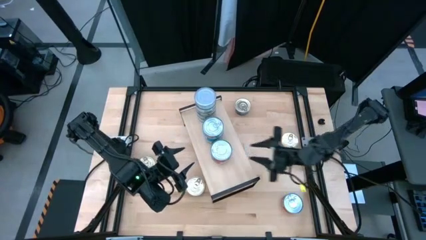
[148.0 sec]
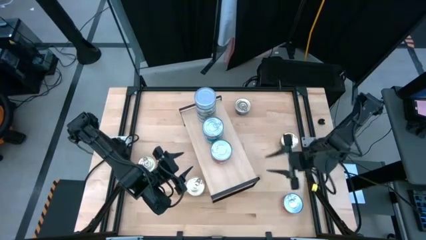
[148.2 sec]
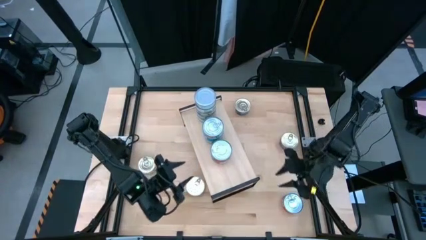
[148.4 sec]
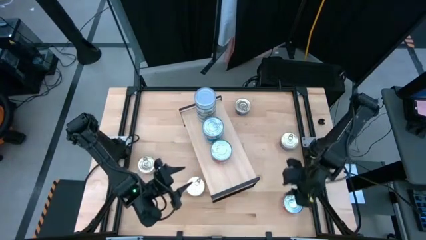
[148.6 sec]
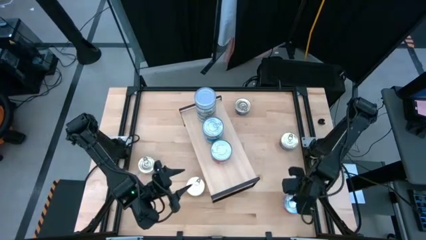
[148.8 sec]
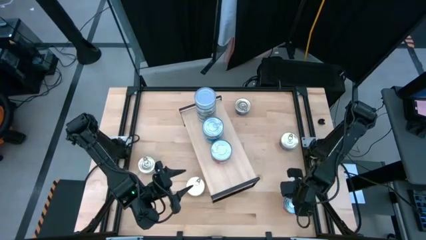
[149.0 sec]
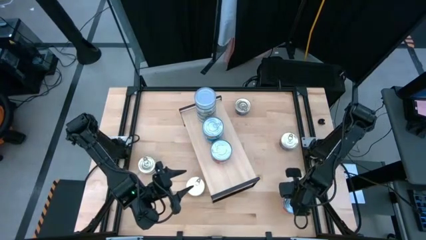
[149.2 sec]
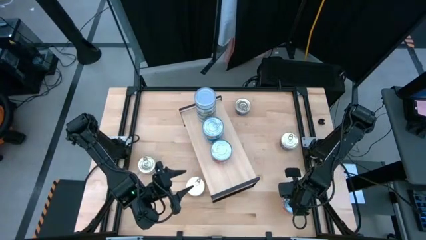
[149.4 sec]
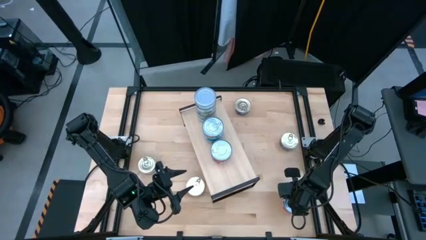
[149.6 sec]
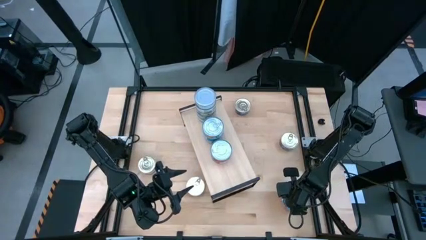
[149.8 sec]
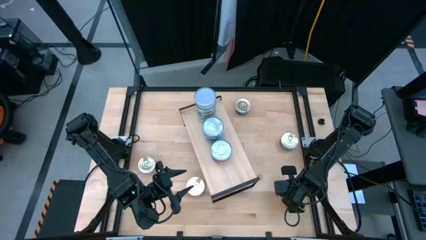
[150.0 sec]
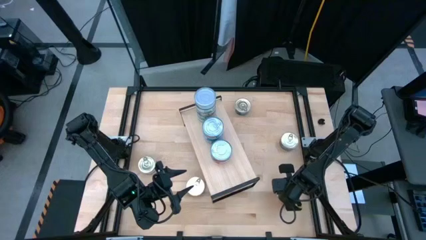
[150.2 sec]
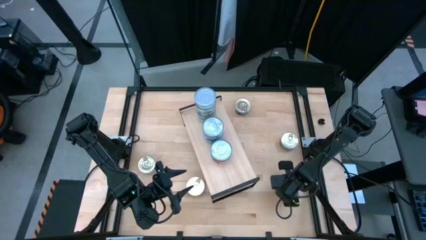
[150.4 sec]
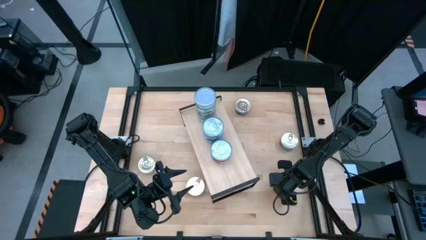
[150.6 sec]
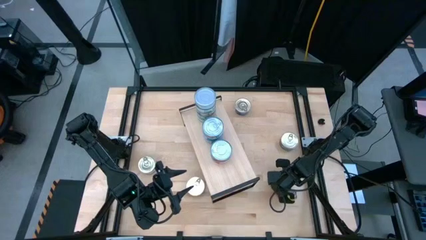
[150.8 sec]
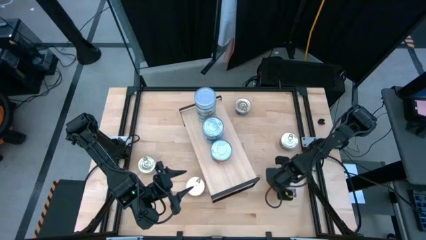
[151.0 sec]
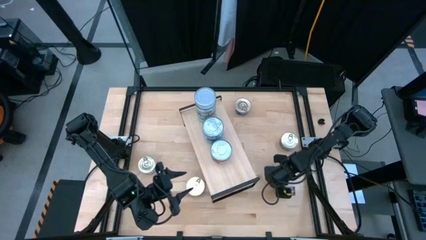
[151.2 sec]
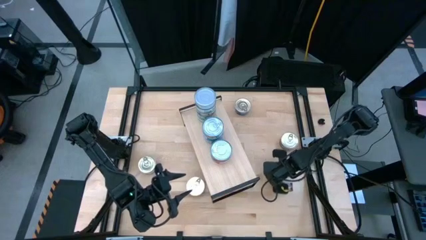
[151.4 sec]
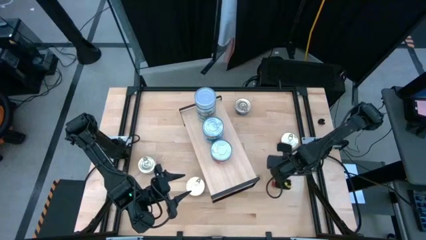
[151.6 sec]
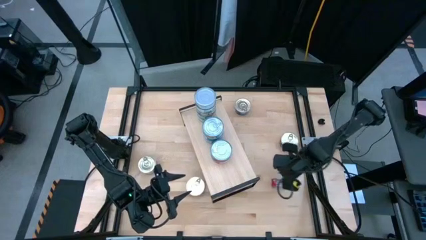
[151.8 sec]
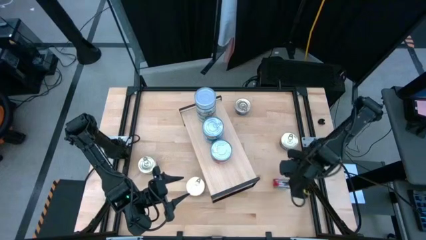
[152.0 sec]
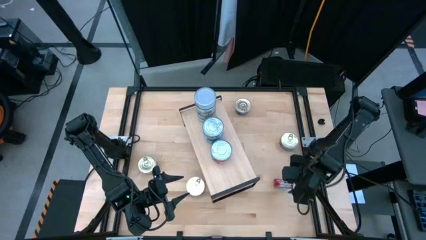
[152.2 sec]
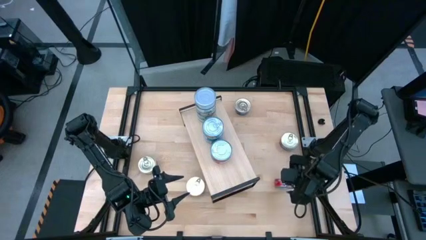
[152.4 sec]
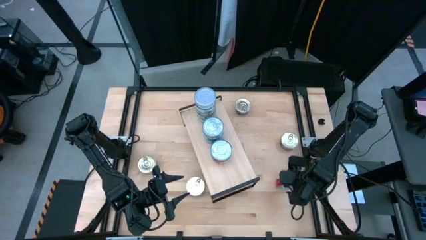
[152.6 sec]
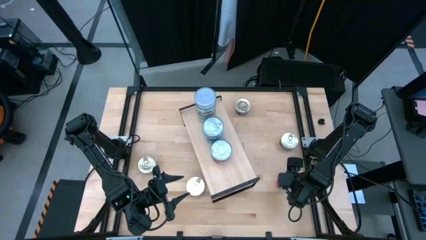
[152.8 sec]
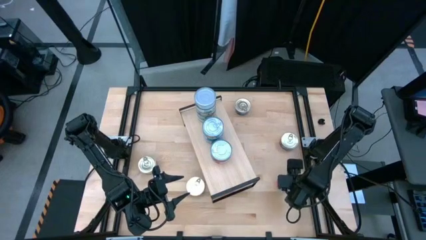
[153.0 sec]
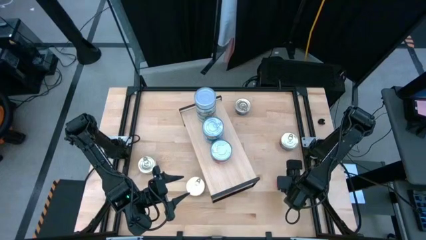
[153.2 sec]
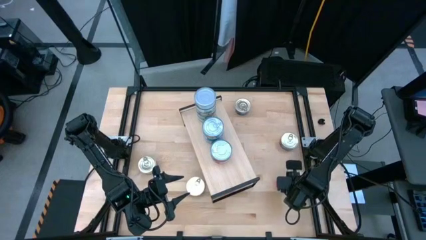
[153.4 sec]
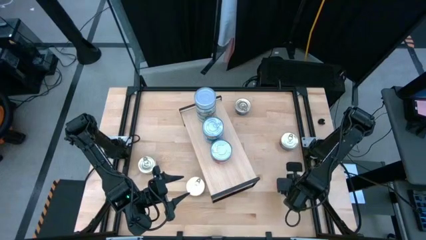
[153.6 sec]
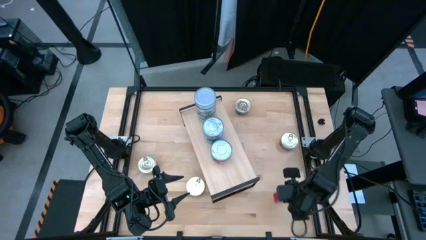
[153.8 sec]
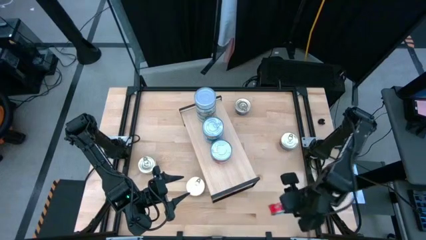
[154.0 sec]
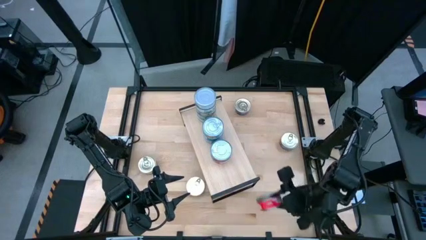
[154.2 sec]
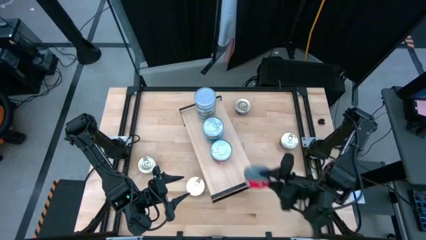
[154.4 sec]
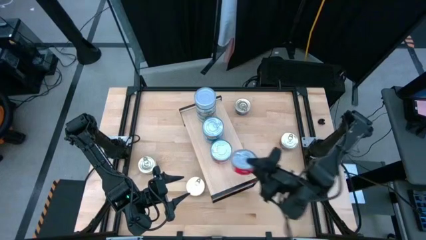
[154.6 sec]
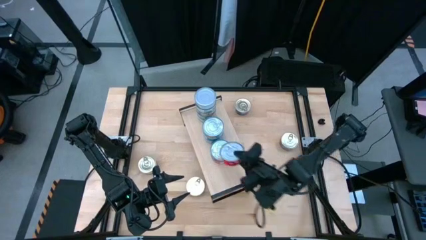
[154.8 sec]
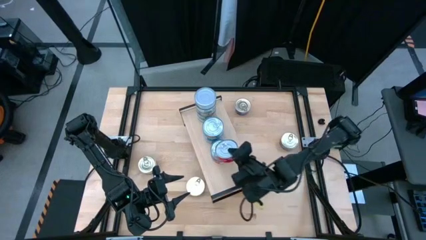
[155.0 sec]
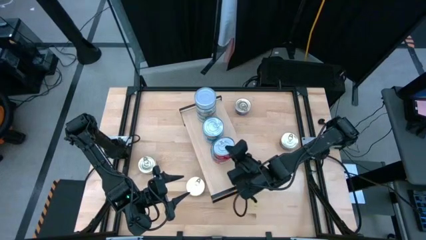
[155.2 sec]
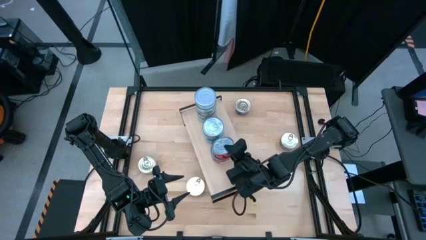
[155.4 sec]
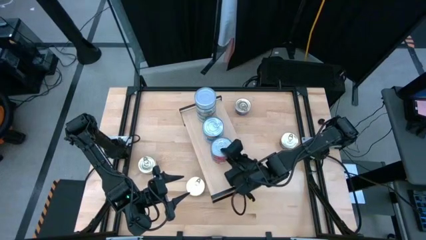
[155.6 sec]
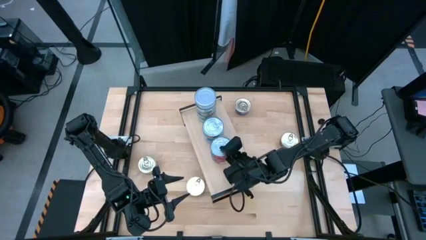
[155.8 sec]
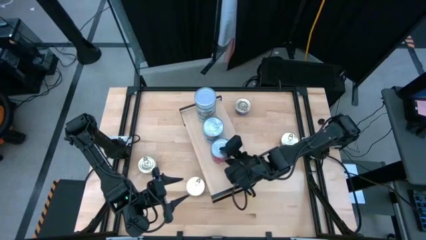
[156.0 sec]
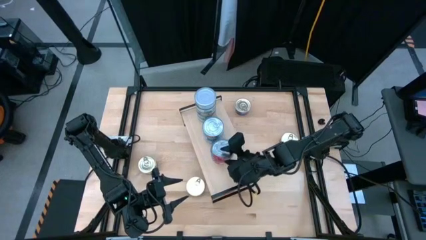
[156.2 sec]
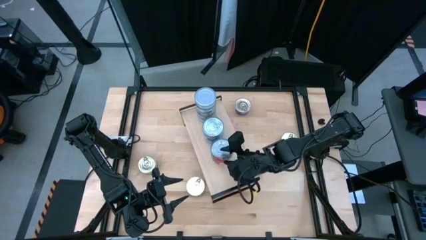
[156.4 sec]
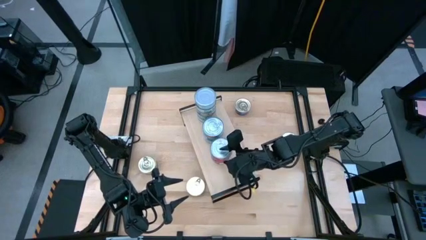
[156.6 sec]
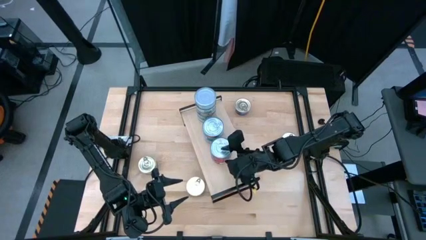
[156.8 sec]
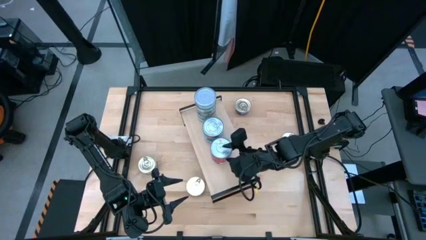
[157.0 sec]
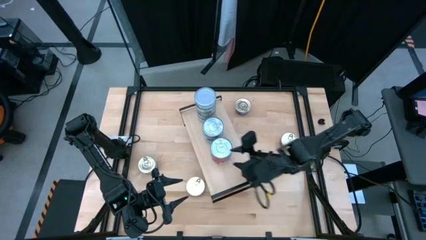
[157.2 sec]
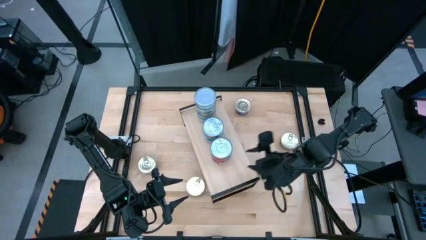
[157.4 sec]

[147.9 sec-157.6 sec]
Task: Stack canned seafood by type on shelf
Stack the red tuna can on top of the other red tuna can on the shelf

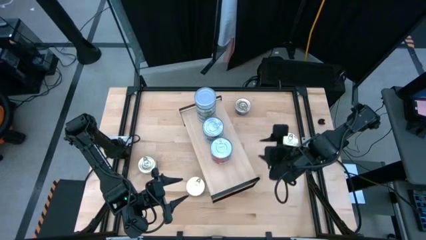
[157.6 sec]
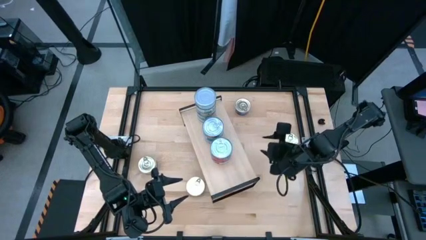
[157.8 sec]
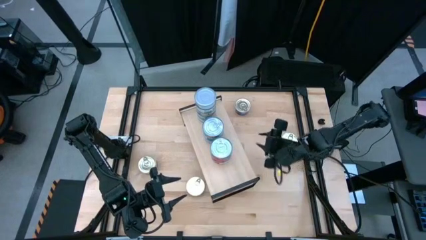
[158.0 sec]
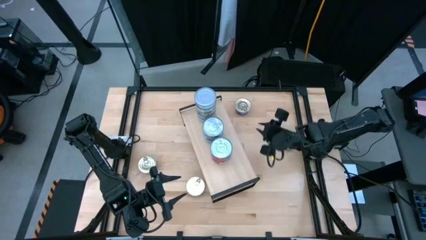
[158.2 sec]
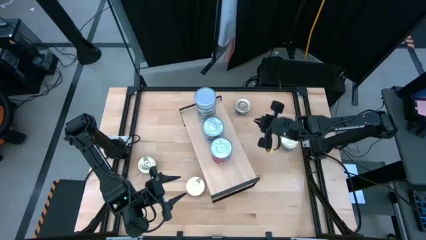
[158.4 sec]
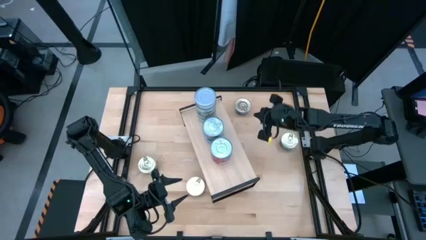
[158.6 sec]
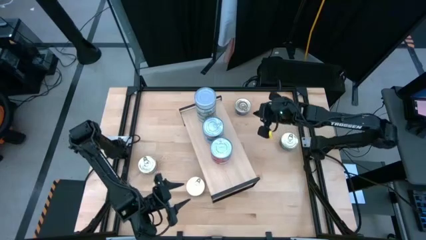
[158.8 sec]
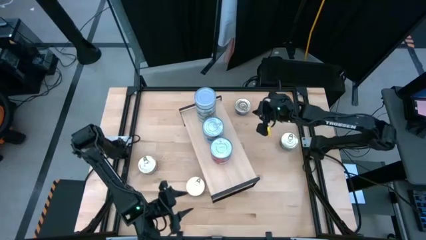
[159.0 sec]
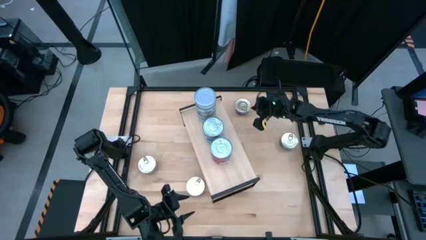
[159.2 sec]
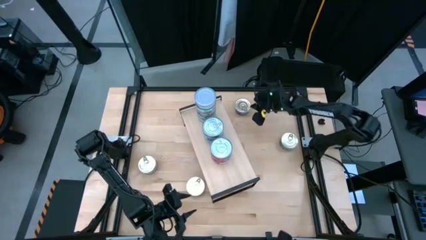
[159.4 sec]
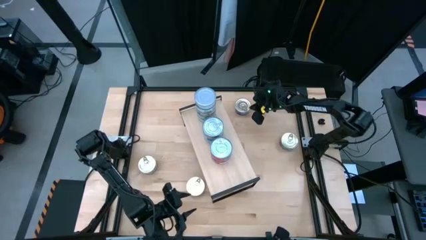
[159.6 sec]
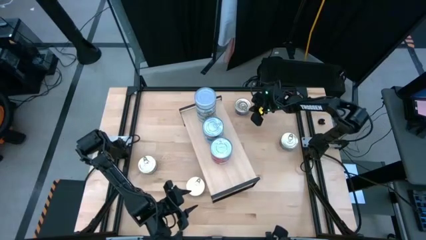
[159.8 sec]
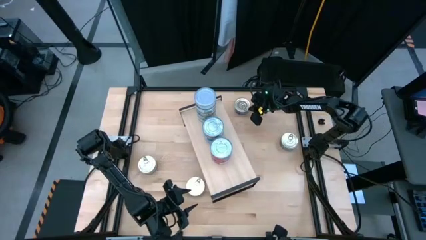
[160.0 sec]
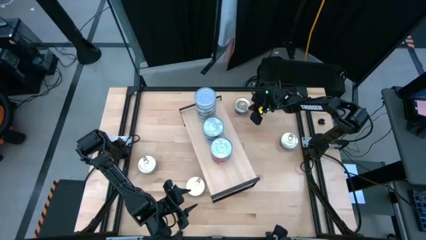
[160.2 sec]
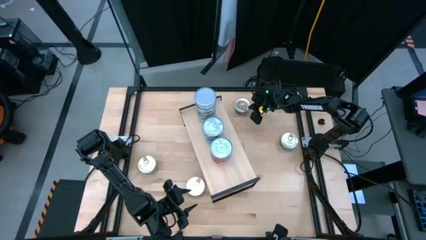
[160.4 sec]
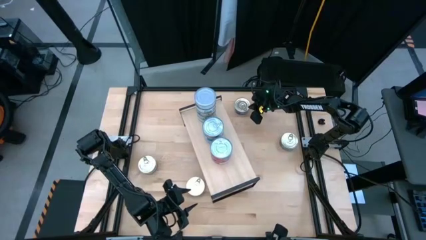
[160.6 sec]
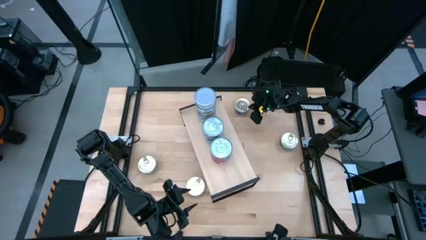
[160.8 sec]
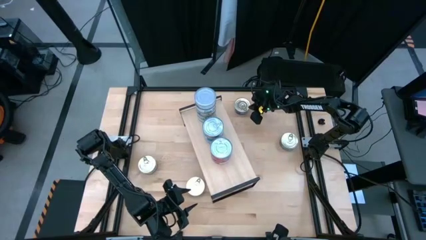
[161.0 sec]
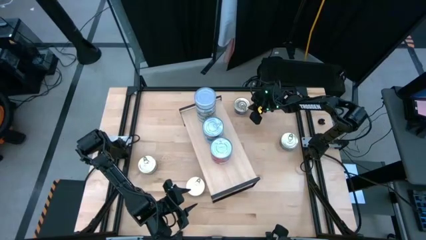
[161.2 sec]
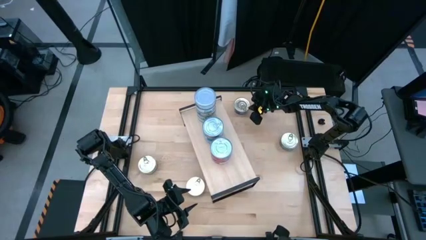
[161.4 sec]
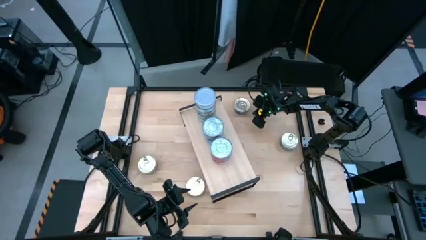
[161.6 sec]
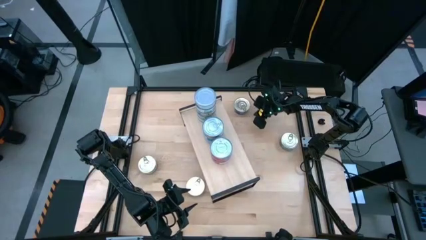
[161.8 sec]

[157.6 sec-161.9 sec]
Put the top blue and pink tuna can on the shelf
